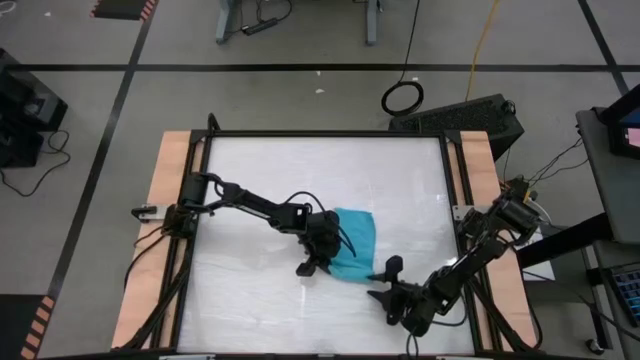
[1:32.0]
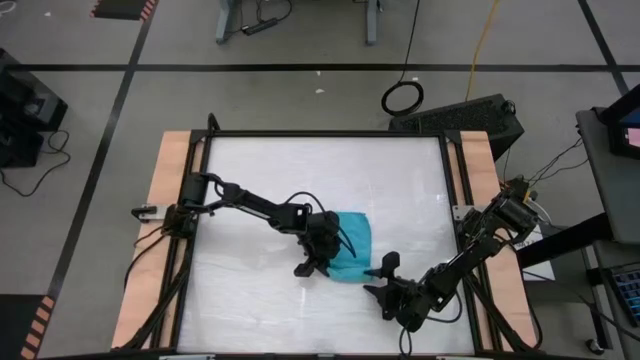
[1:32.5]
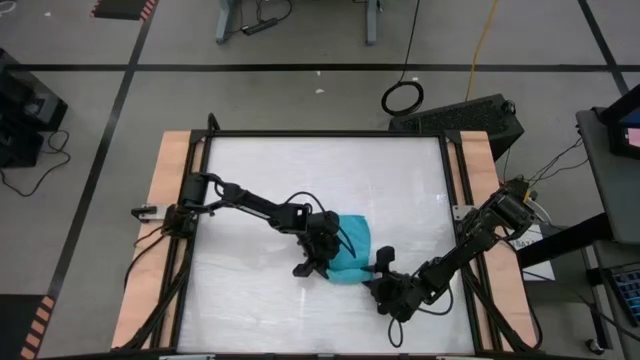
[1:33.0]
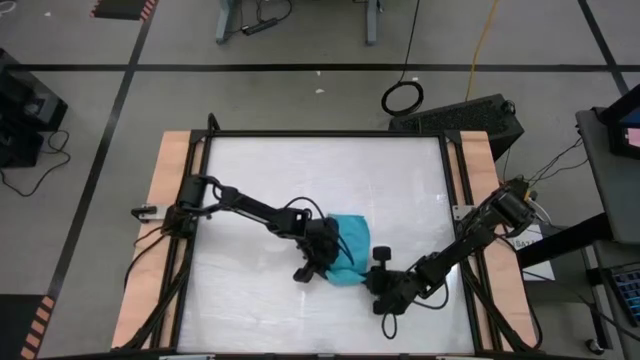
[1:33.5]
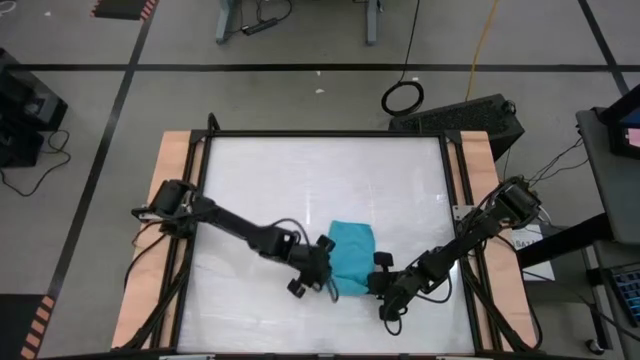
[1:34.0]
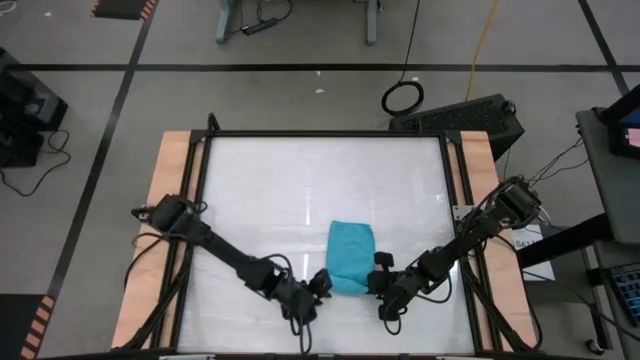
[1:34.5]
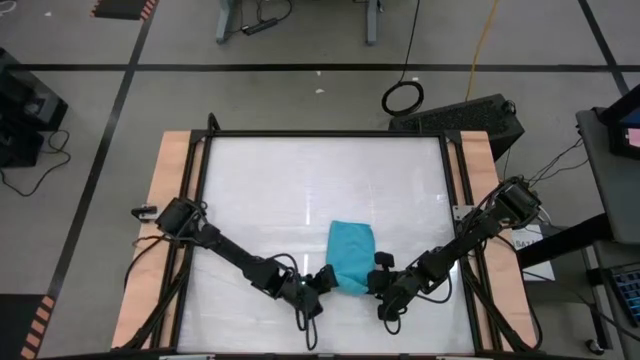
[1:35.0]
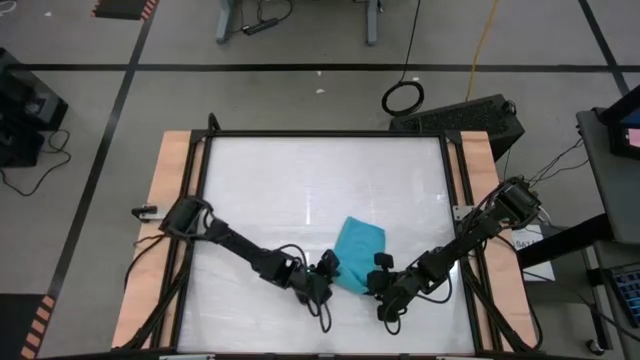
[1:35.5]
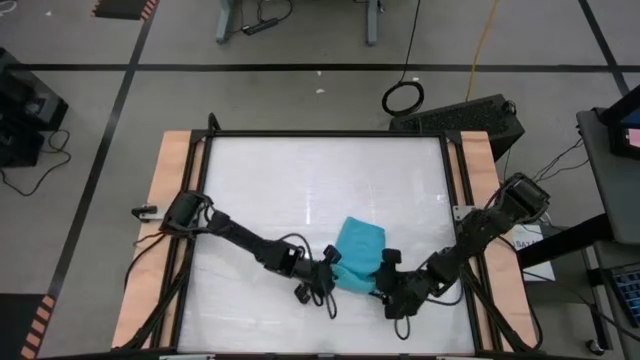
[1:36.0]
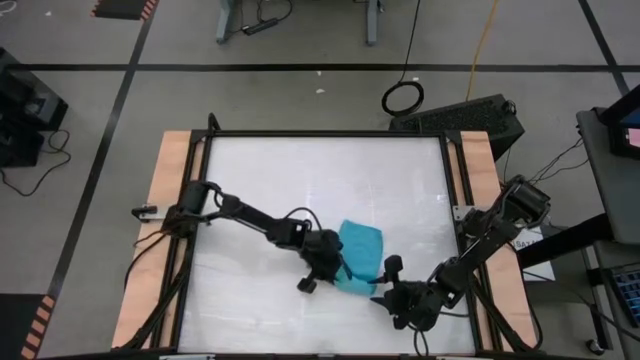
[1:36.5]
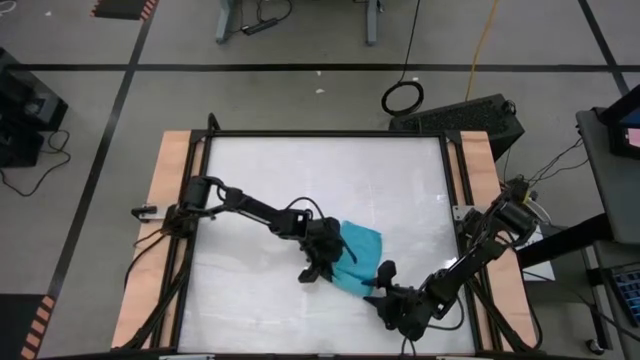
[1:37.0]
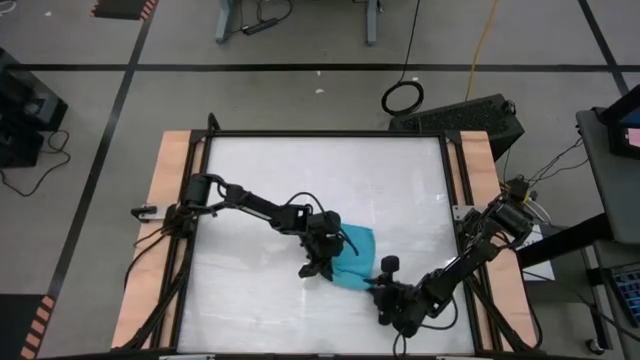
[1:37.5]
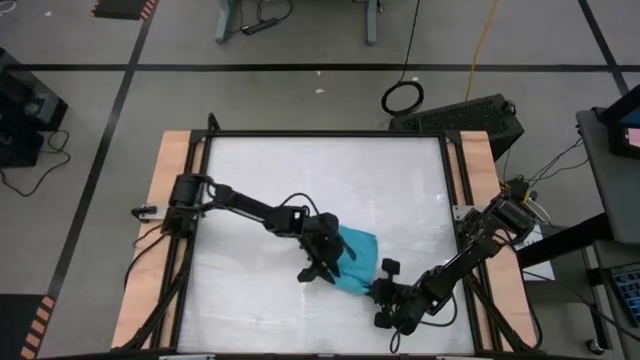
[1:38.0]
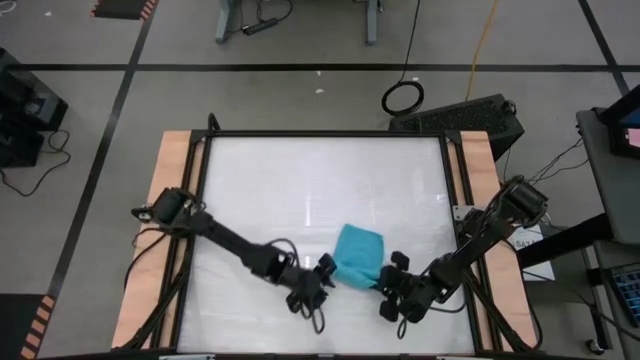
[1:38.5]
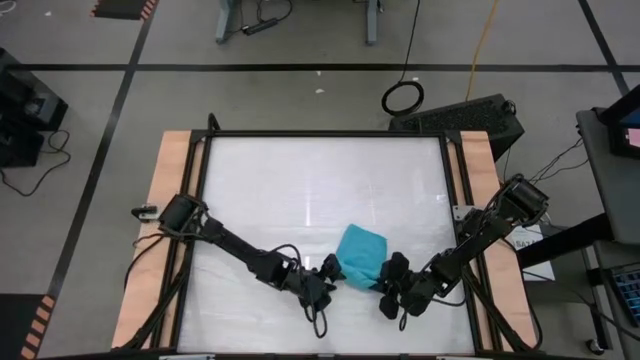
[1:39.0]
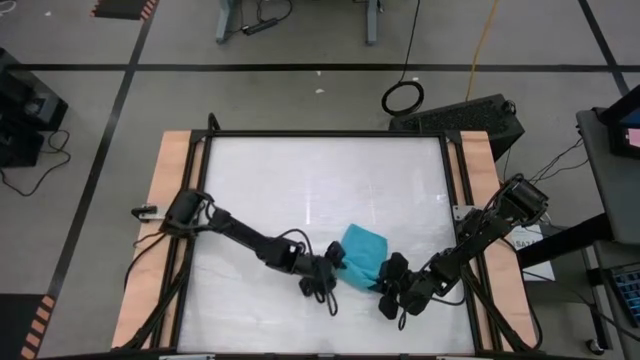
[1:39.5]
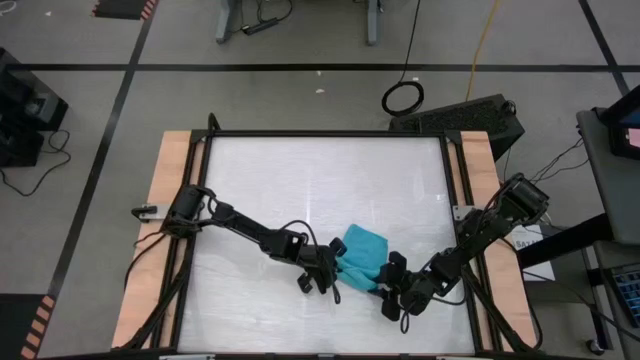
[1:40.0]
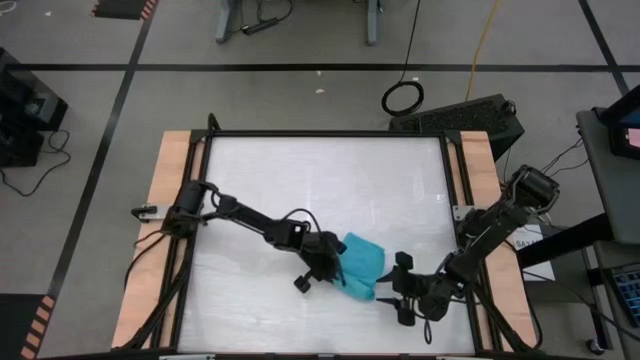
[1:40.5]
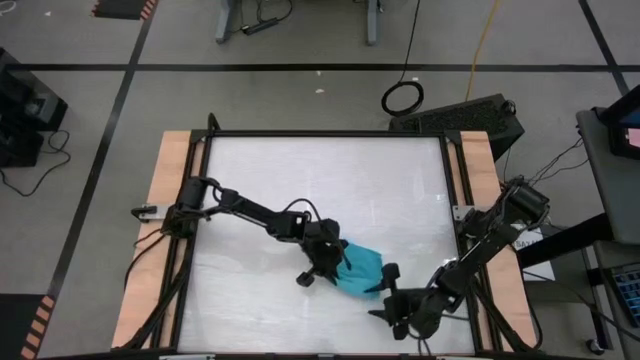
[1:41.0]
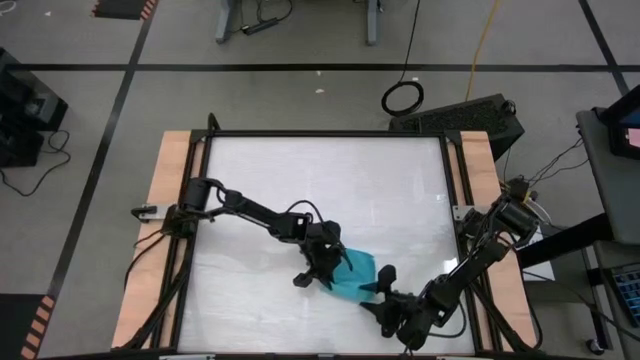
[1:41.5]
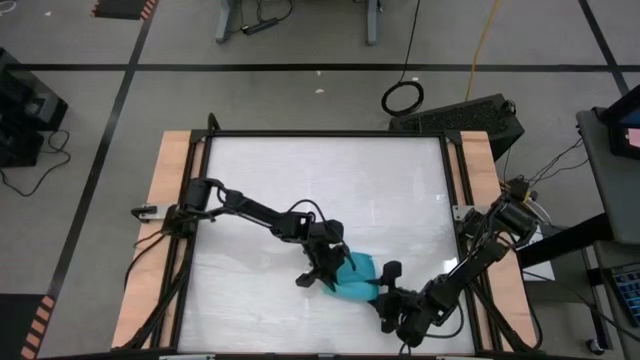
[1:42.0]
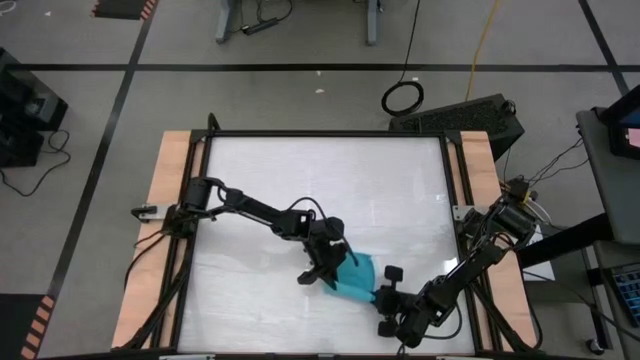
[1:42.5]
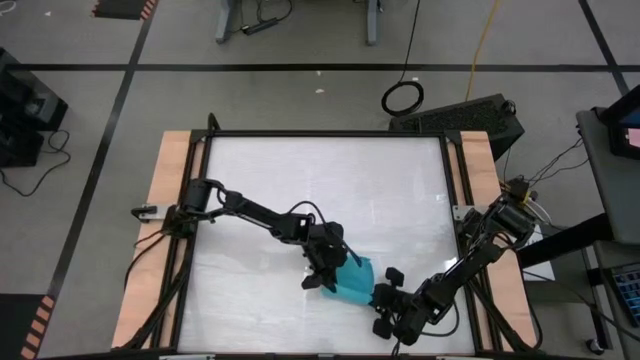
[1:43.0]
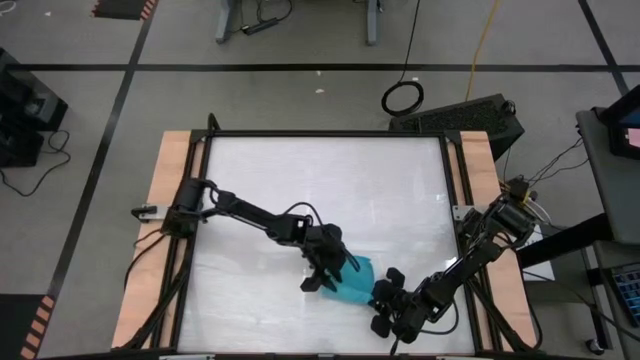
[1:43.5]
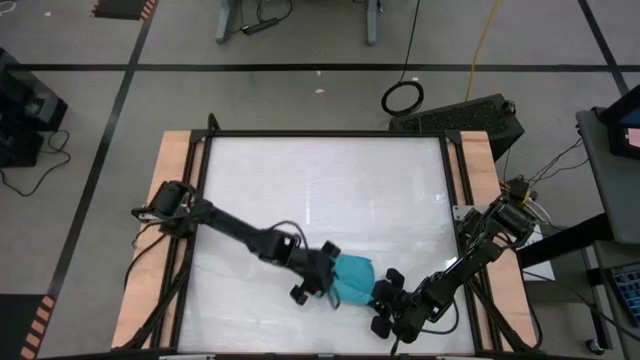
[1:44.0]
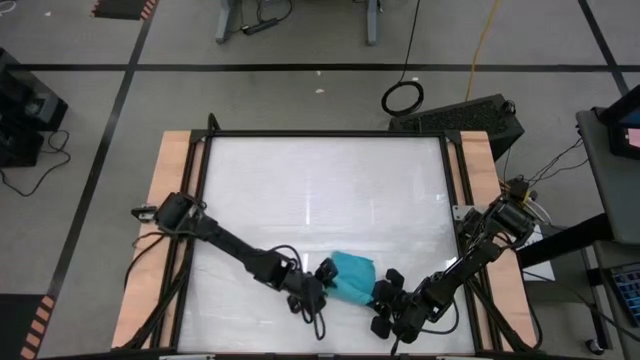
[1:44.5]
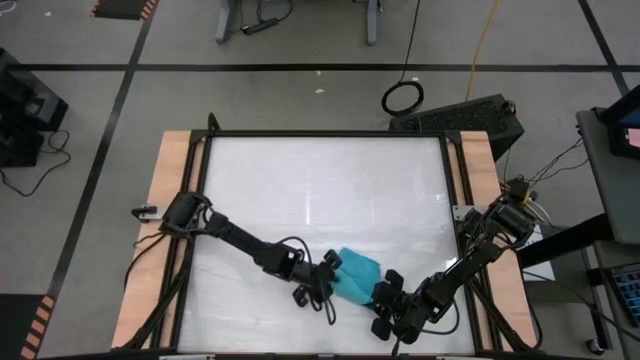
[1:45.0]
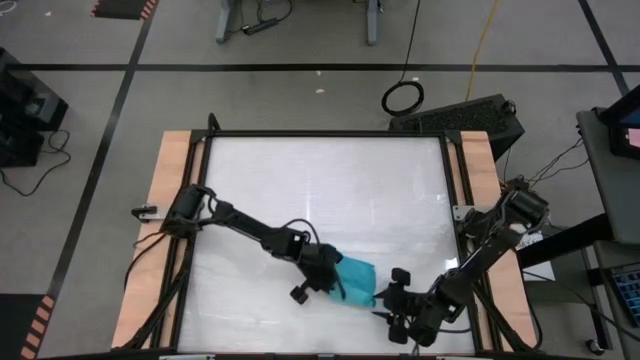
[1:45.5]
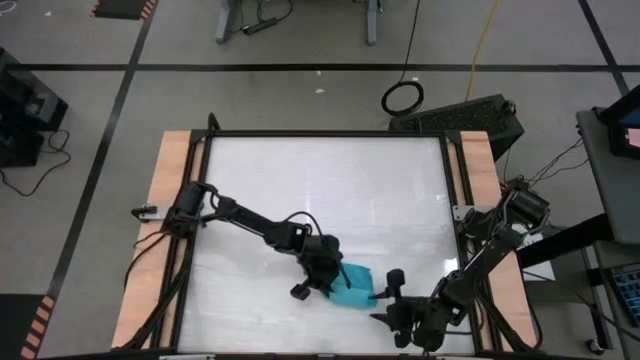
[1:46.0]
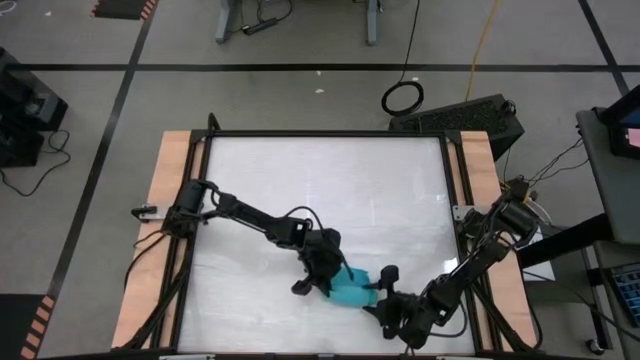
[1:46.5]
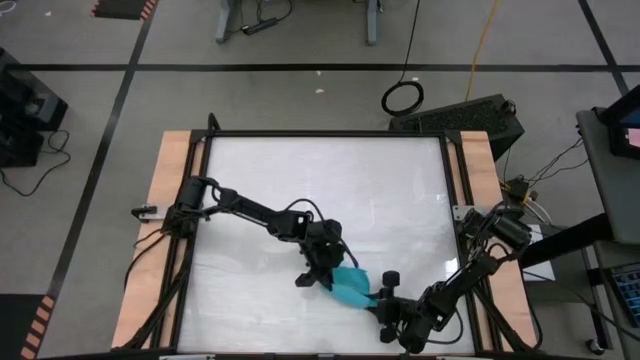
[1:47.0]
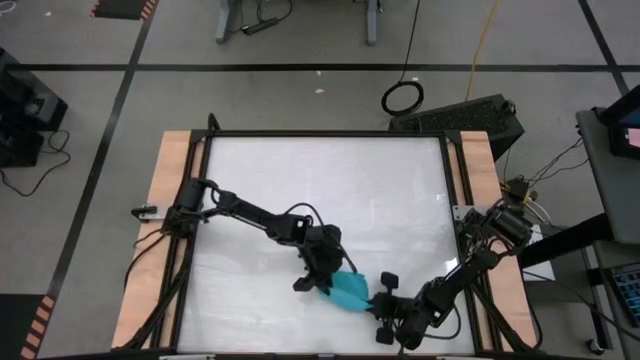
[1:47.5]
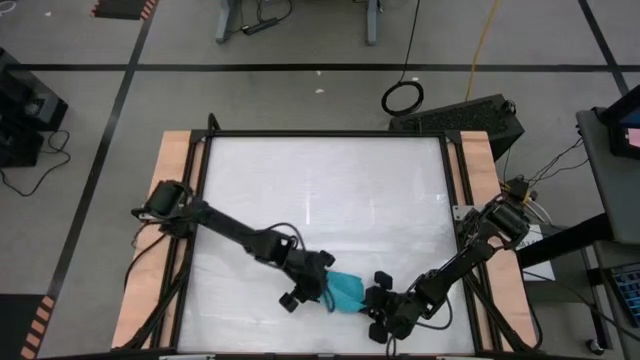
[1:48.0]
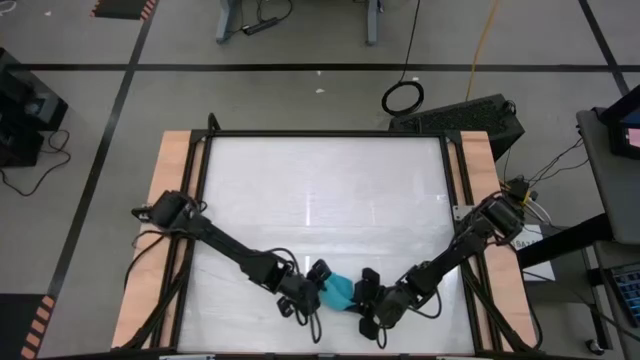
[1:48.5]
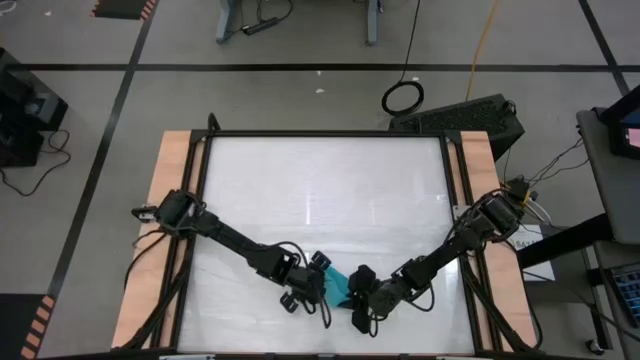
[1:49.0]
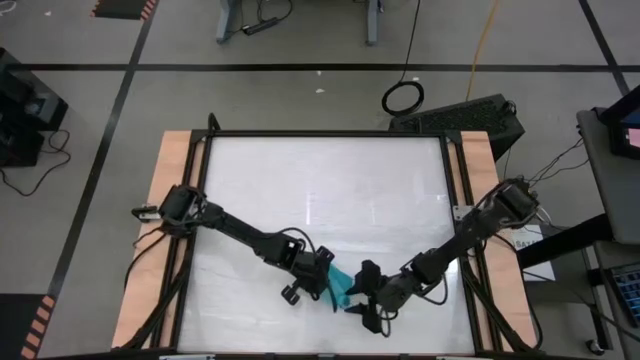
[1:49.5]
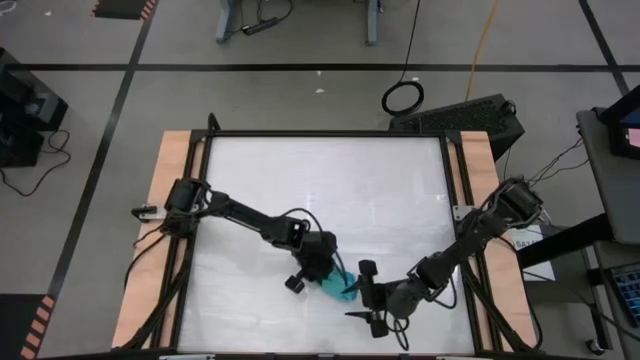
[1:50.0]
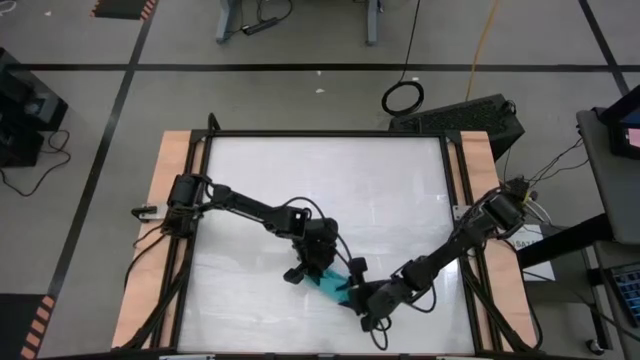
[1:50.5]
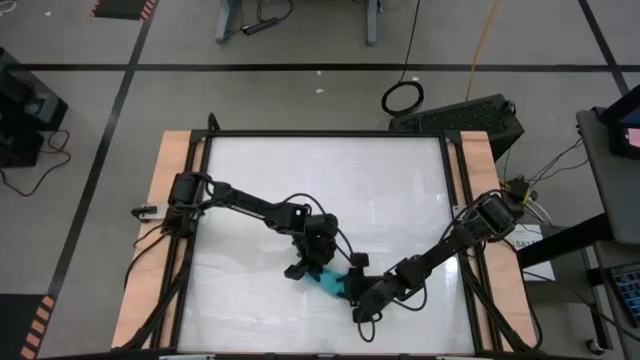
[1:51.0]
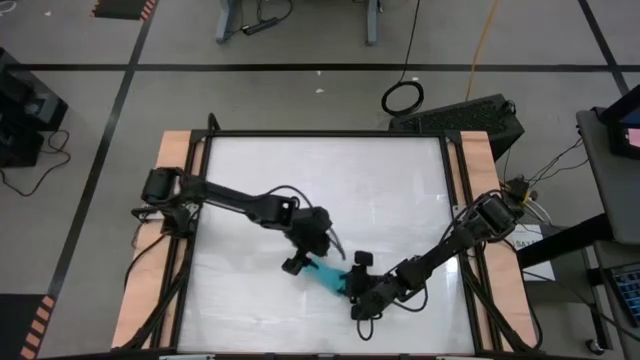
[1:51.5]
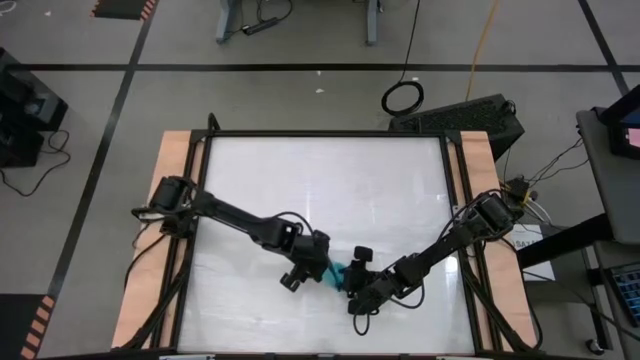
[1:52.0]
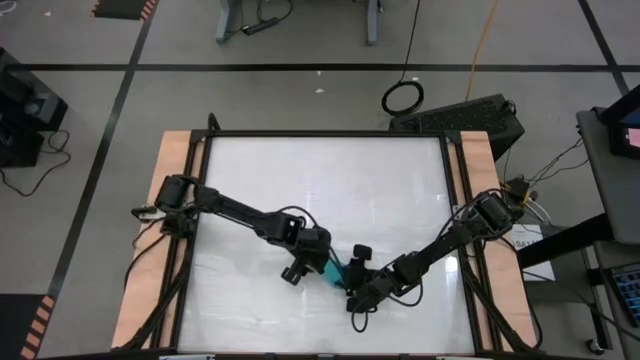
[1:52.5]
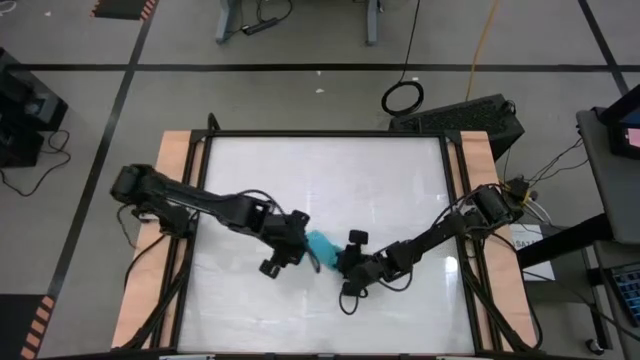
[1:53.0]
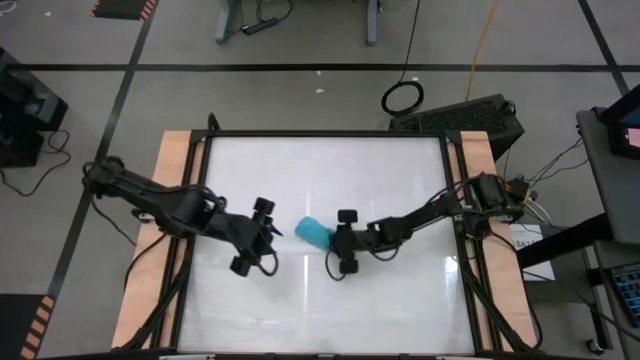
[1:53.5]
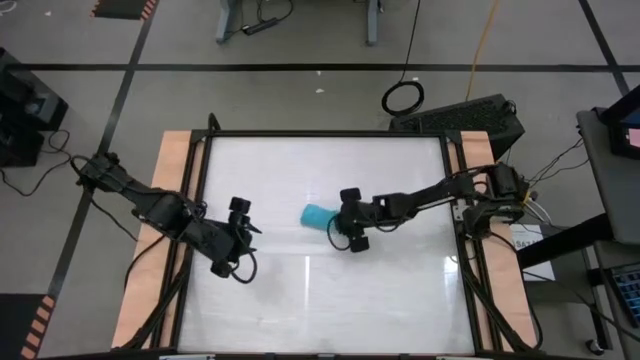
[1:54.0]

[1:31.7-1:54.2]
Task: Roll towel into tight, uniform cylinder
Roll the blue towel
